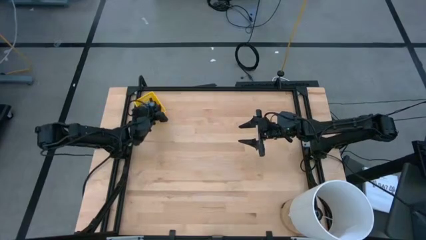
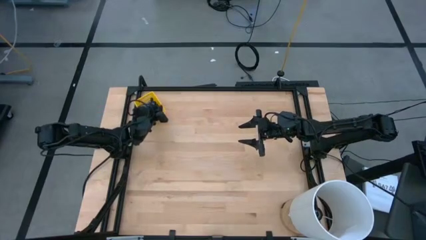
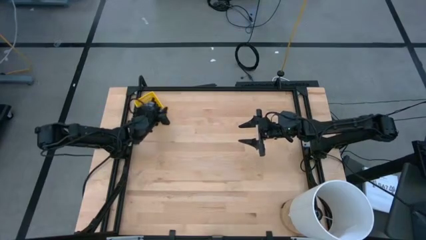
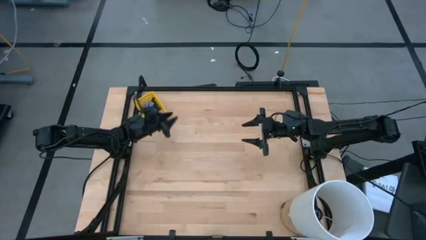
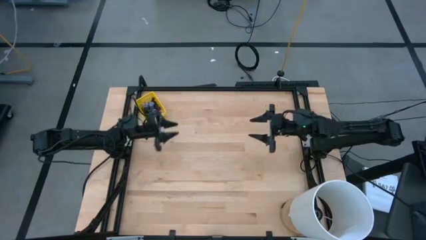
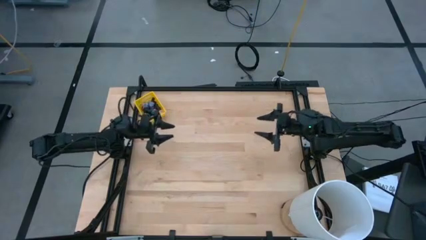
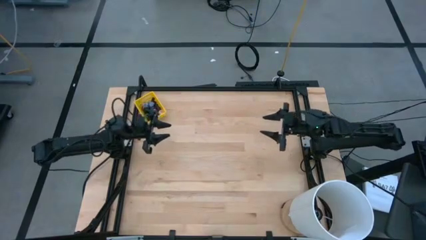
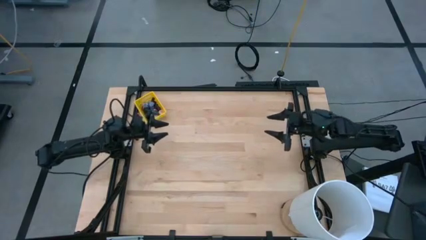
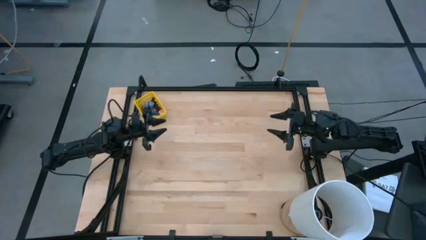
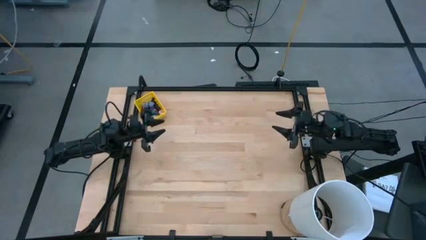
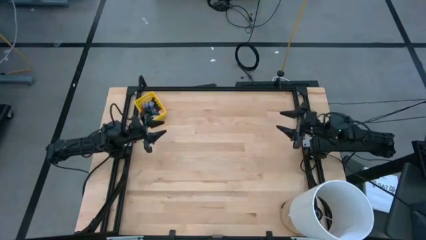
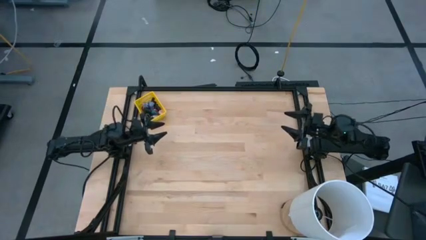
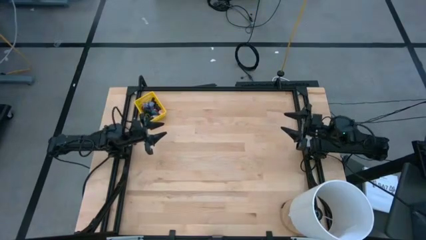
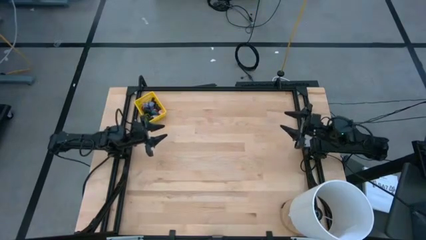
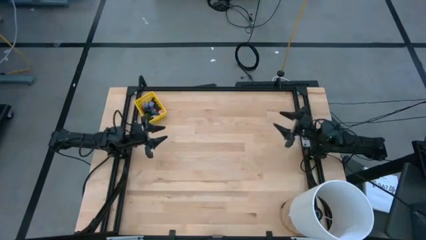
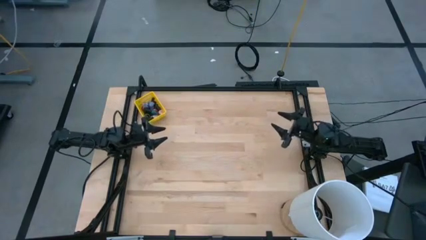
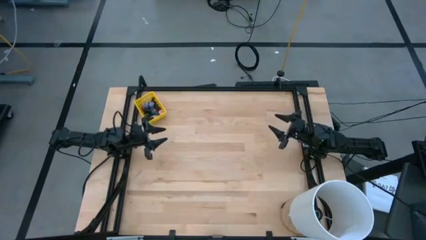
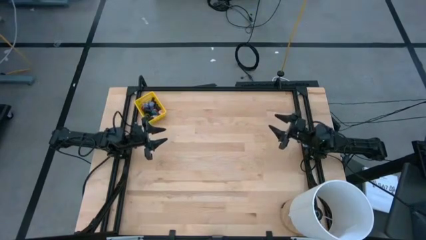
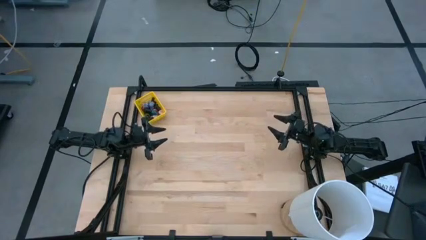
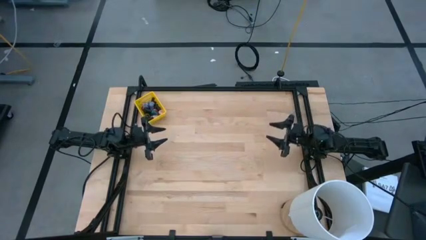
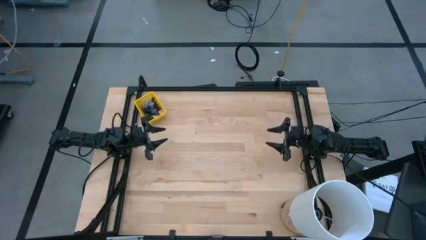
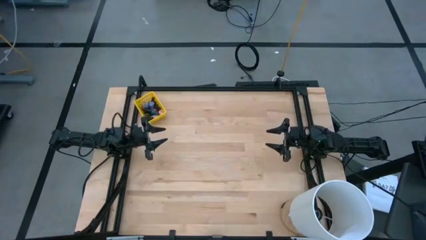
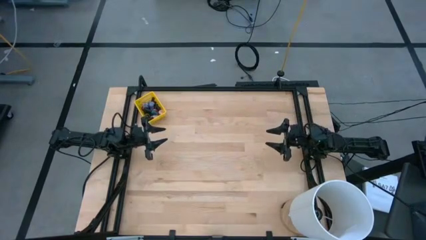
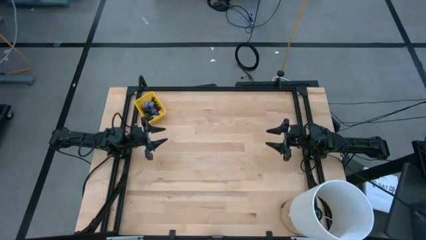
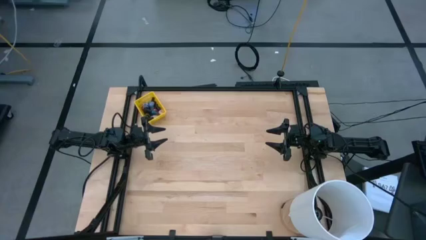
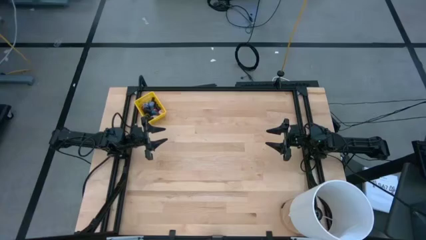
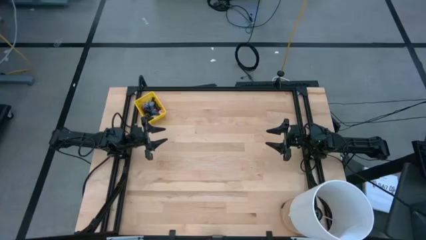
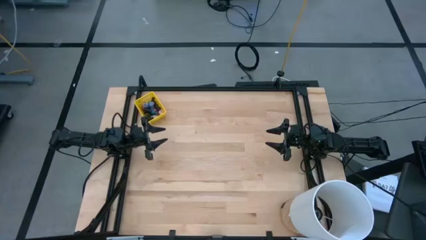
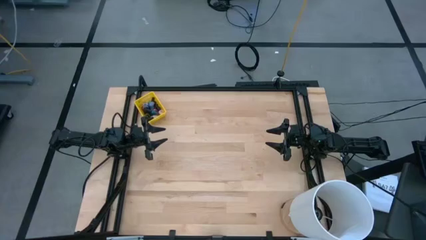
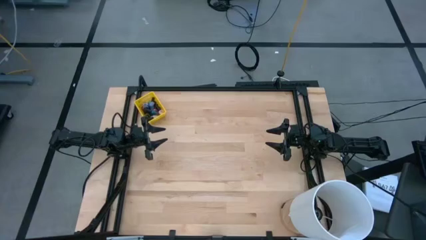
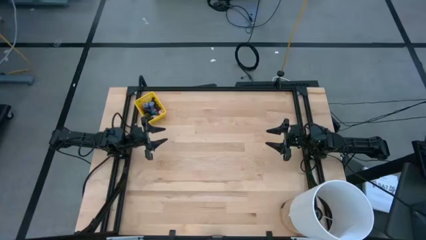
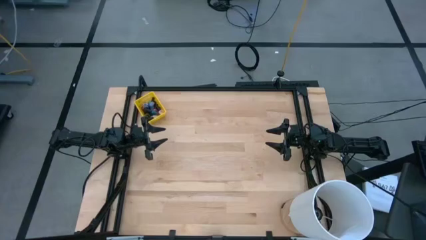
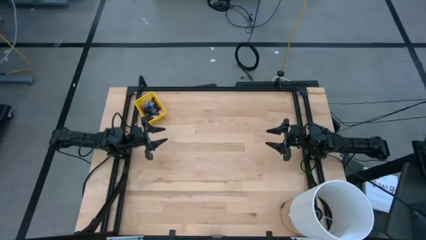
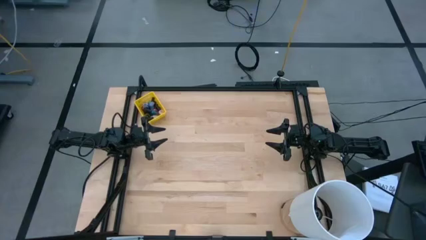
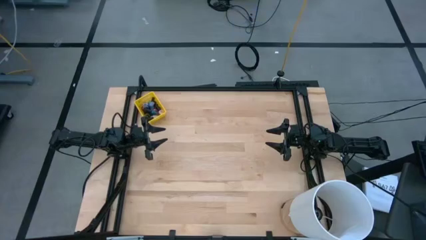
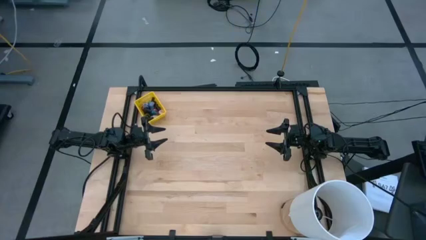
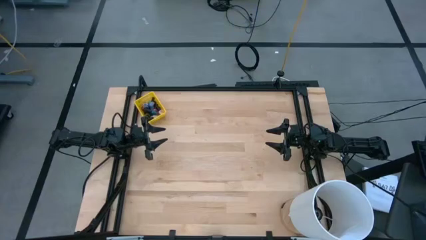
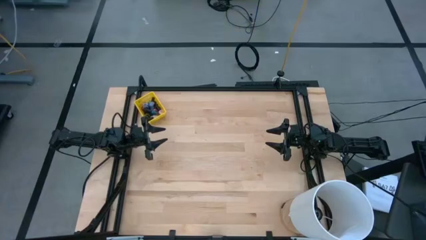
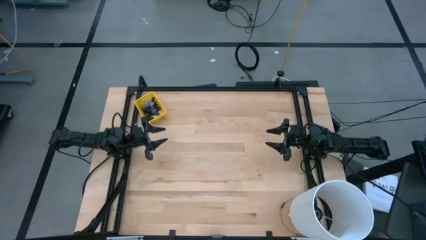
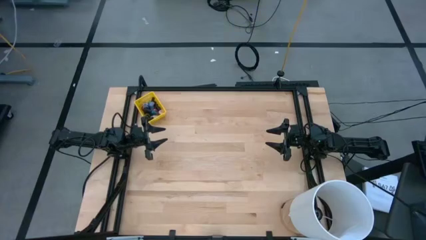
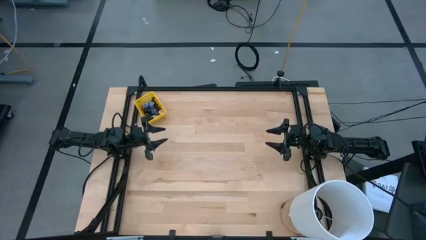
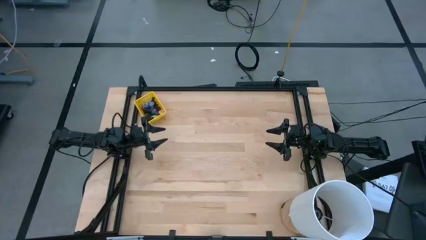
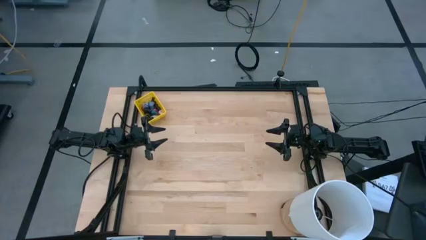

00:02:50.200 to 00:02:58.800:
Task: Pick & Place Nail Polish
Return to Home Position

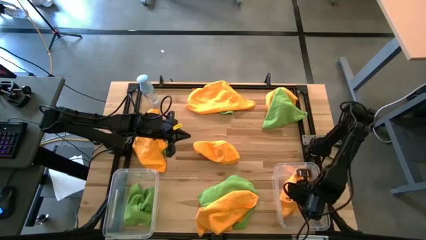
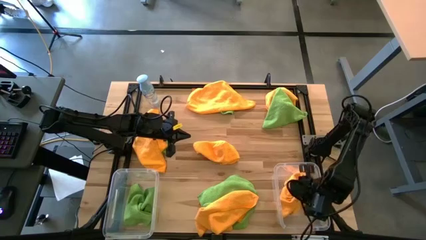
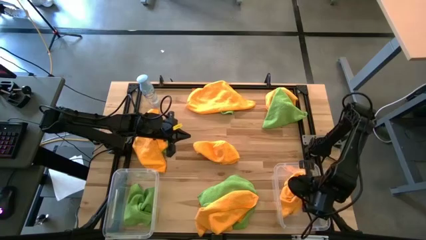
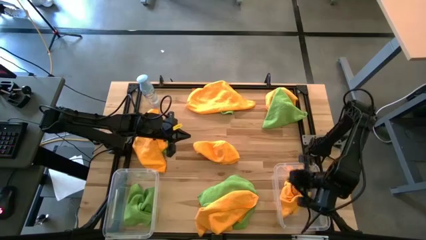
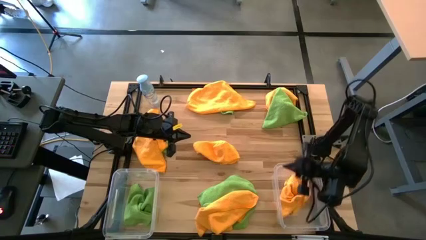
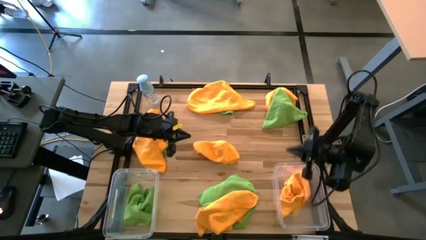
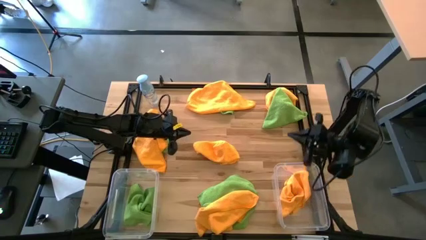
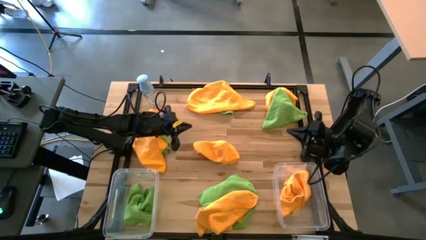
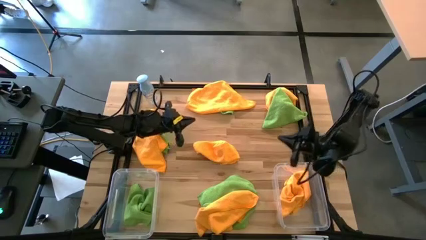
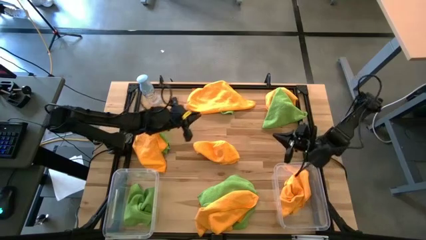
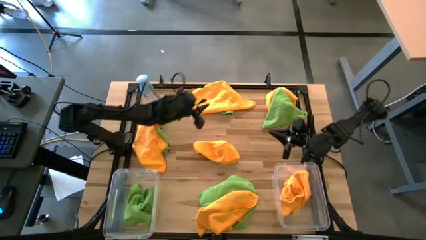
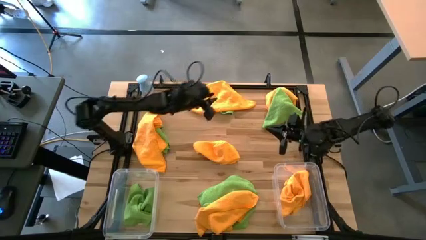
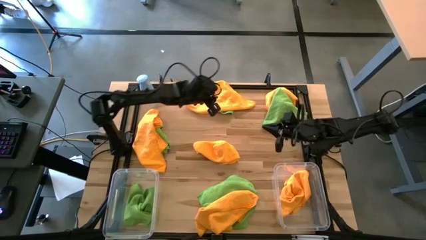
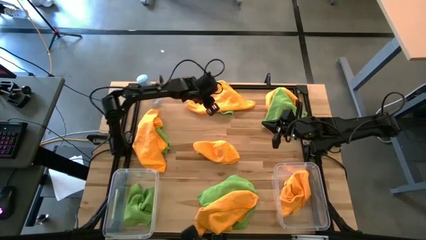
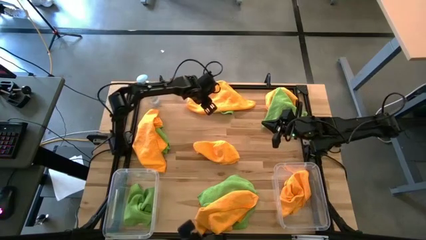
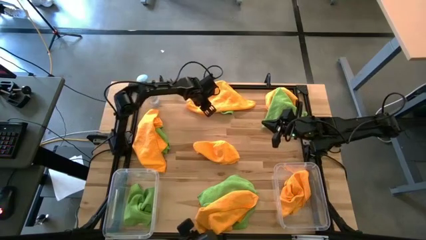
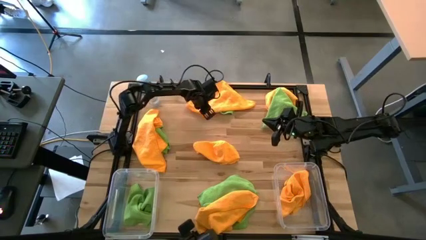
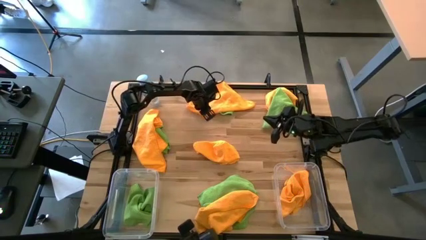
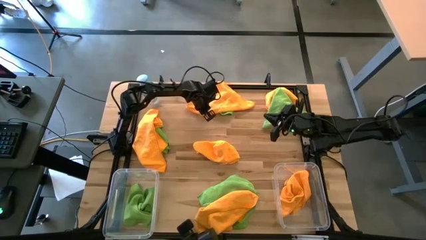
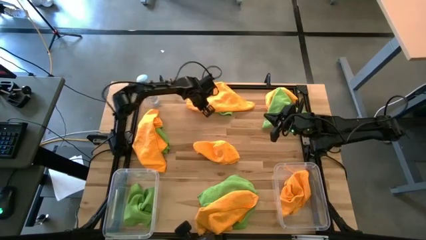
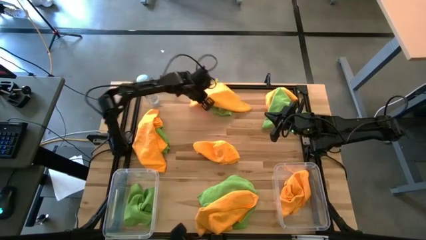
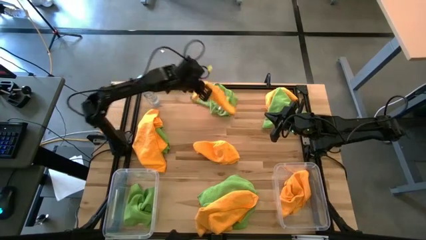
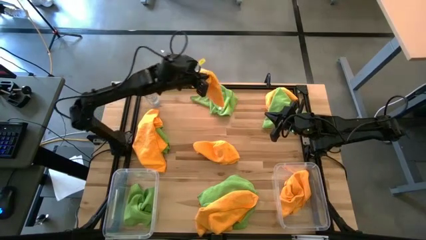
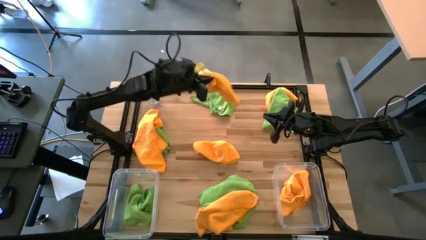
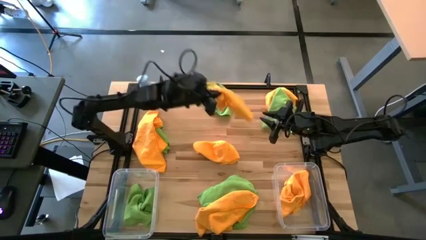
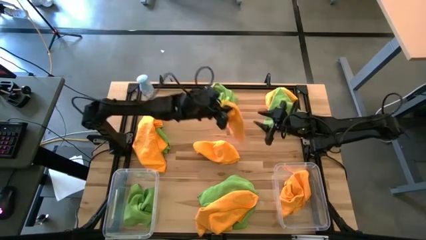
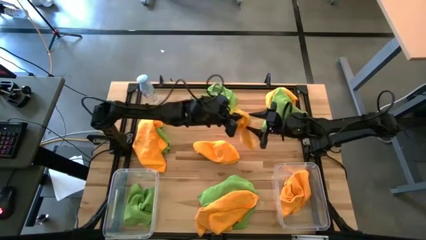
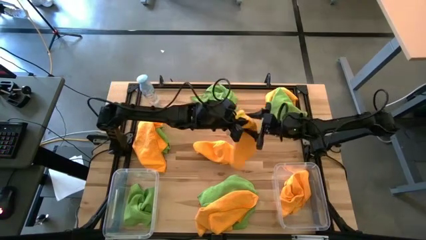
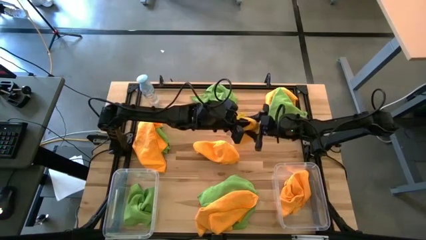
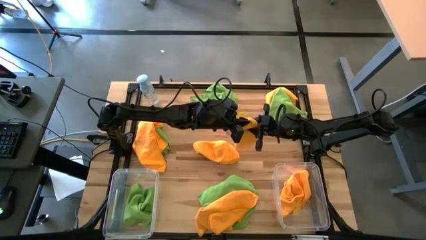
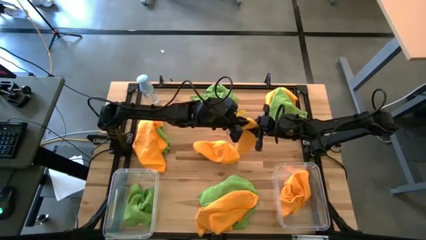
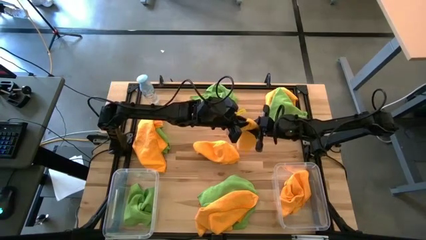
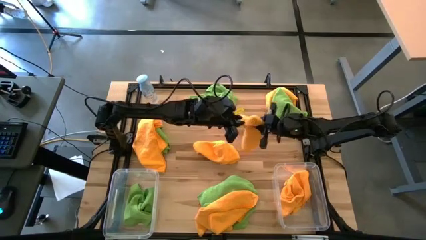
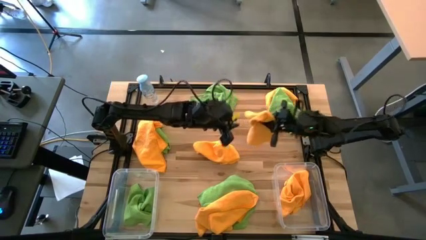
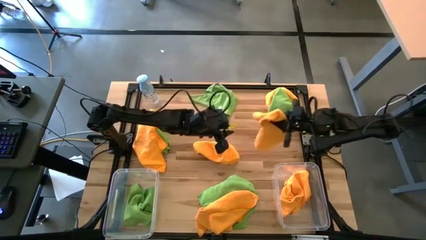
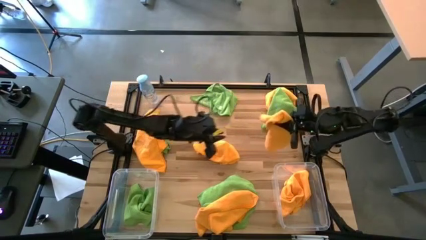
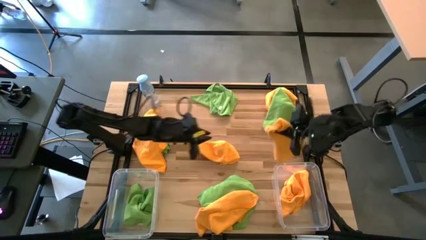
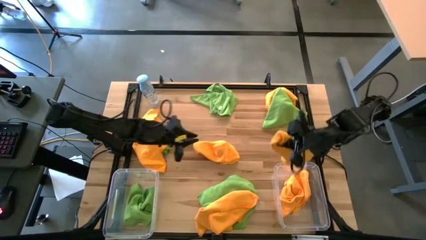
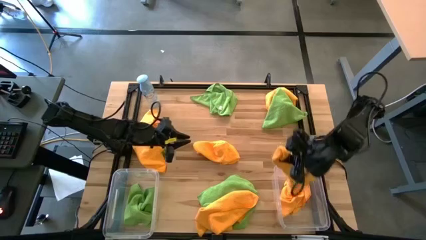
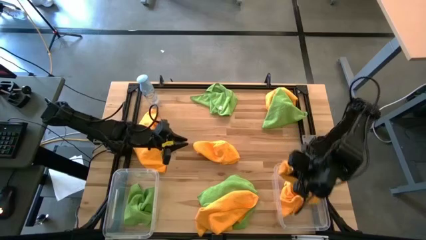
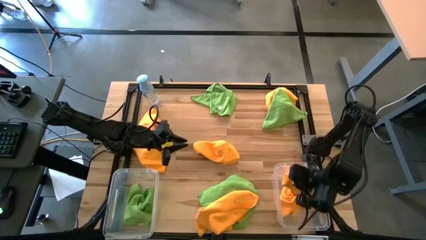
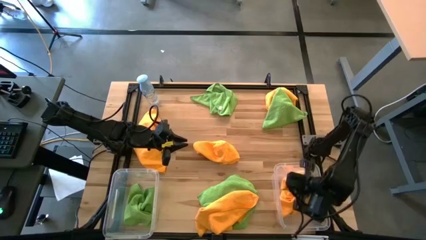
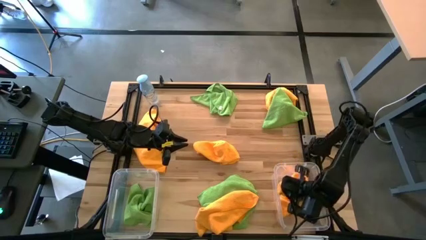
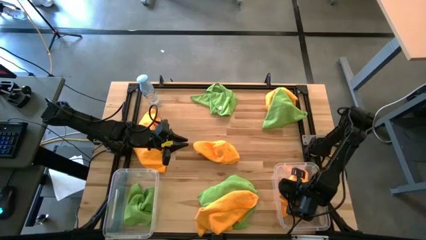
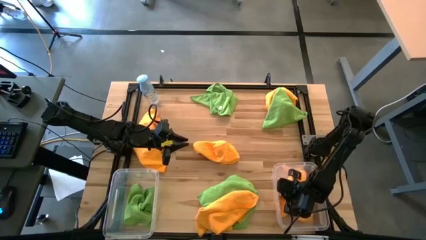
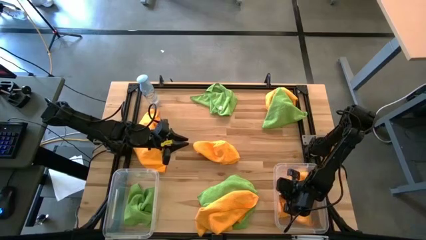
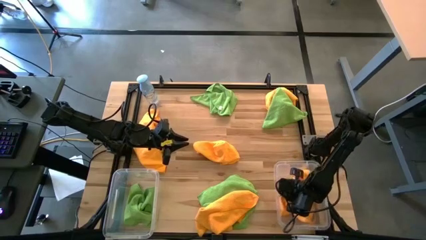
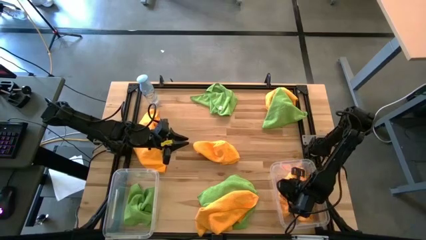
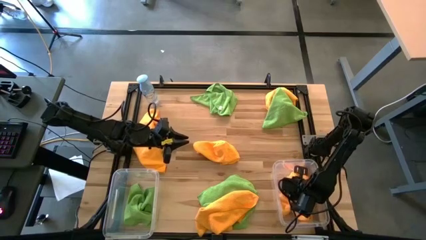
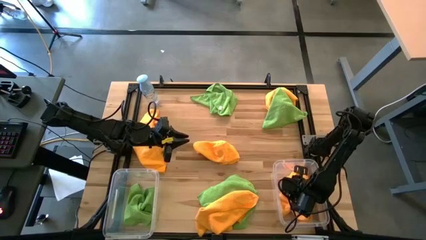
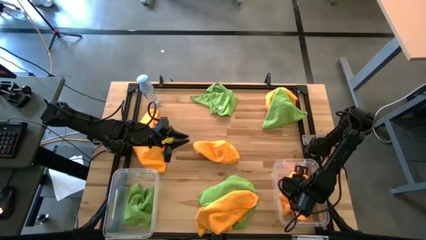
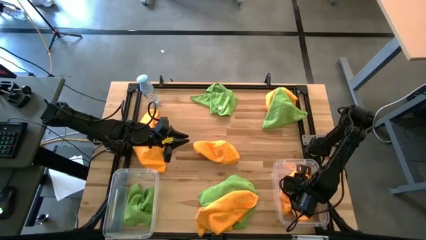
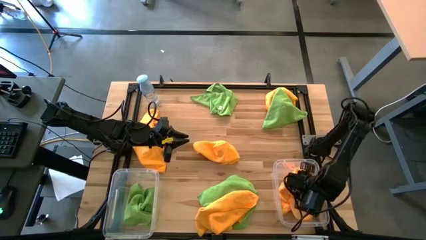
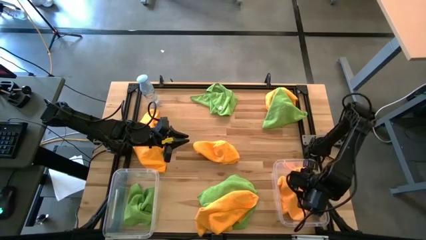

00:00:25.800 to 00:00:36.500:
Task: Sort microfiber towel by color & place in baskets
Put the yellow towel into the right transparent bin
